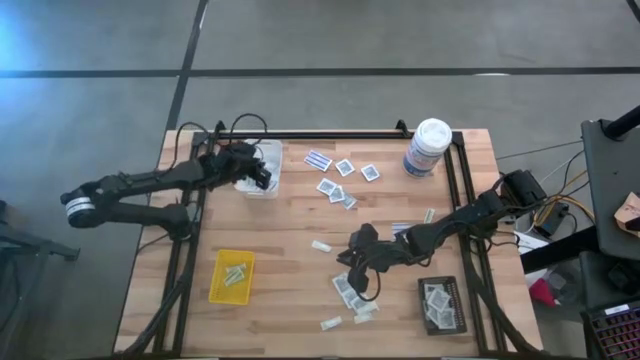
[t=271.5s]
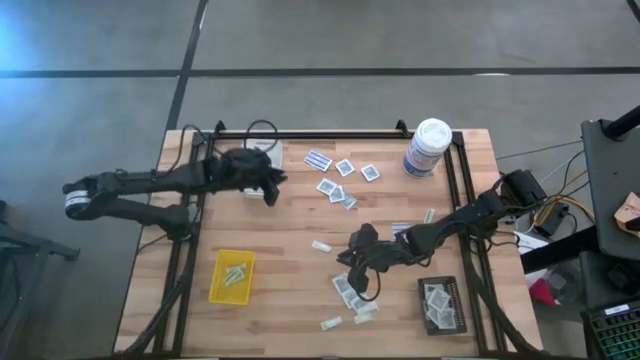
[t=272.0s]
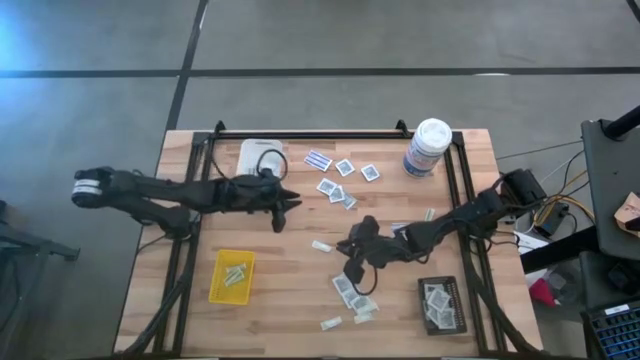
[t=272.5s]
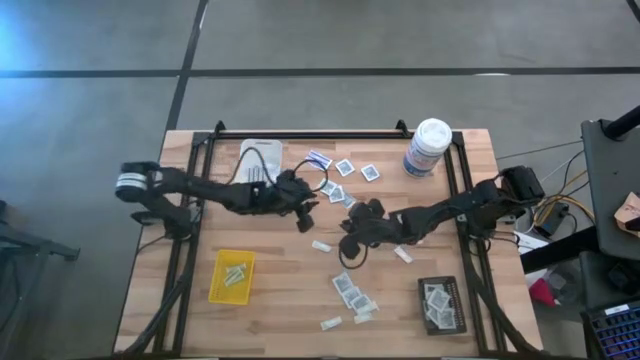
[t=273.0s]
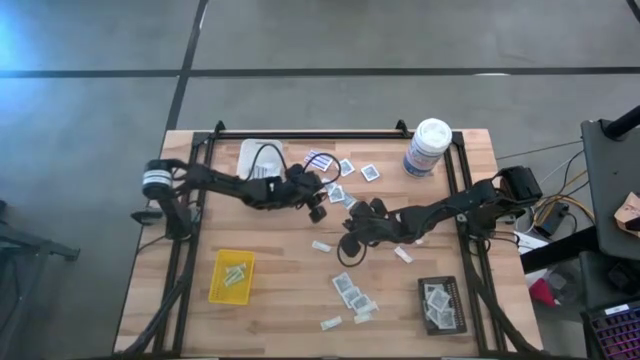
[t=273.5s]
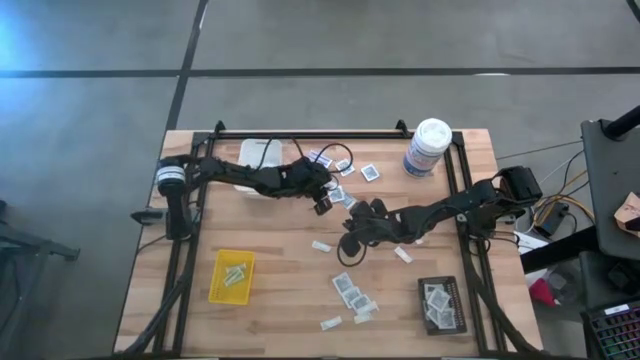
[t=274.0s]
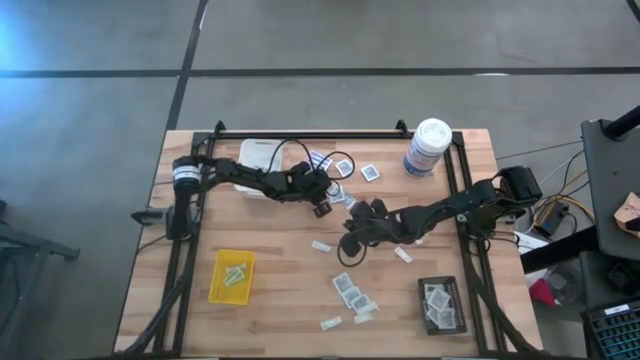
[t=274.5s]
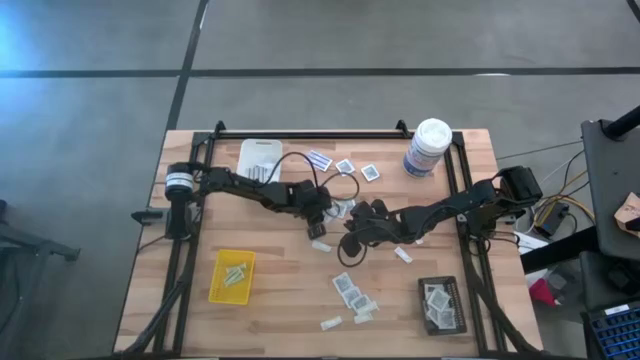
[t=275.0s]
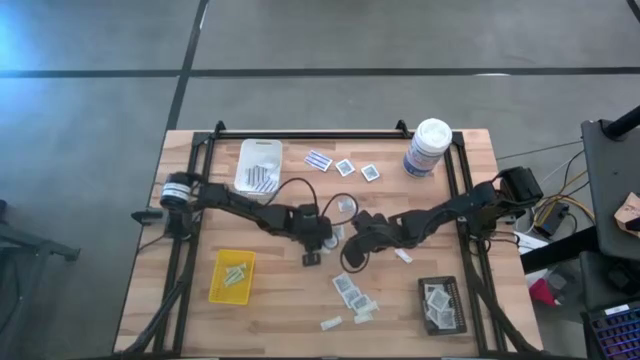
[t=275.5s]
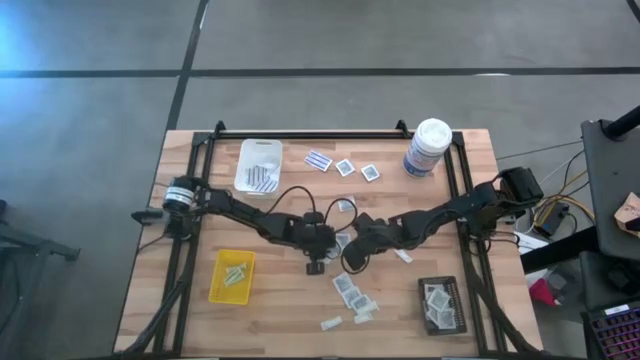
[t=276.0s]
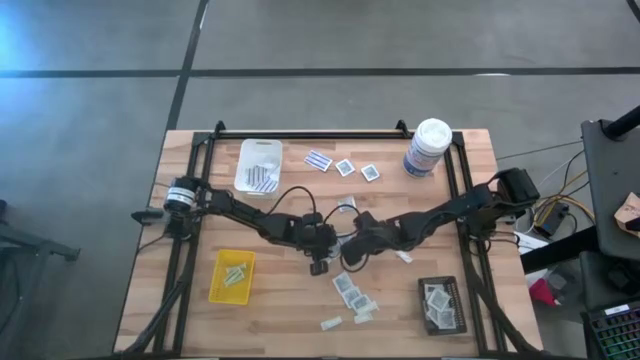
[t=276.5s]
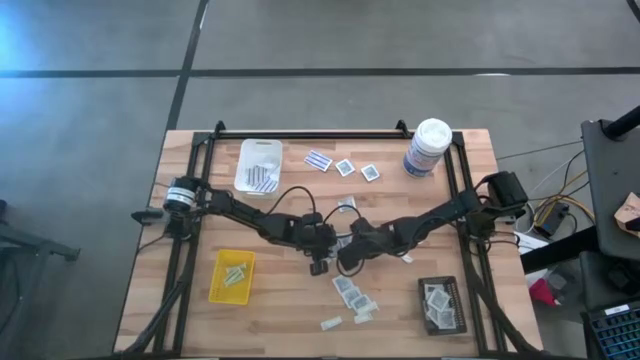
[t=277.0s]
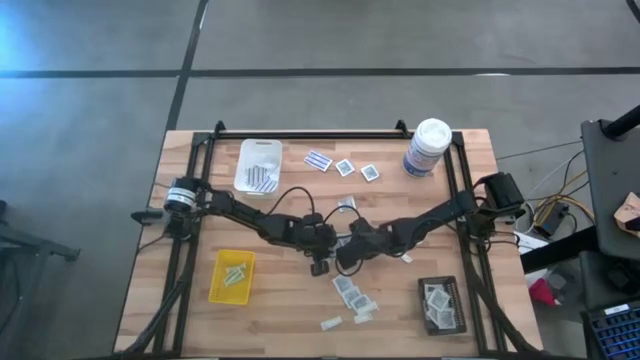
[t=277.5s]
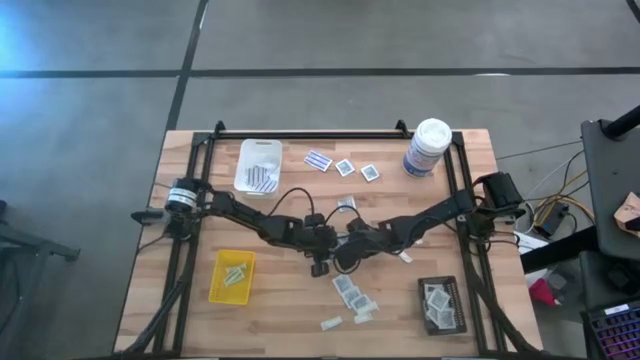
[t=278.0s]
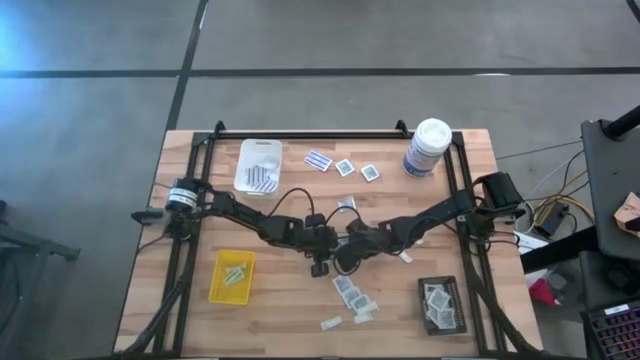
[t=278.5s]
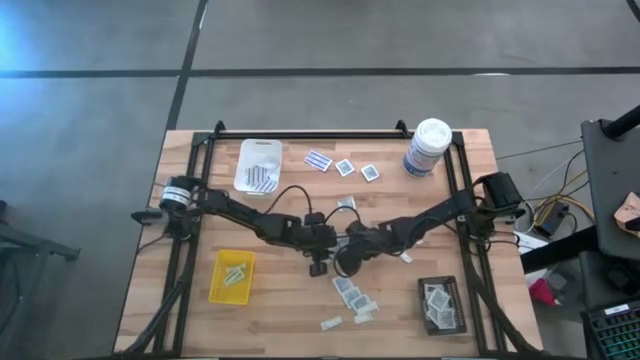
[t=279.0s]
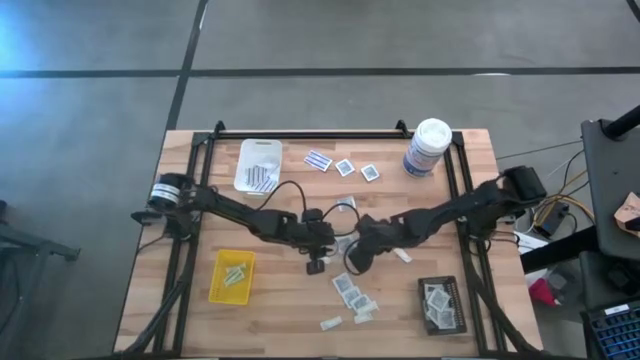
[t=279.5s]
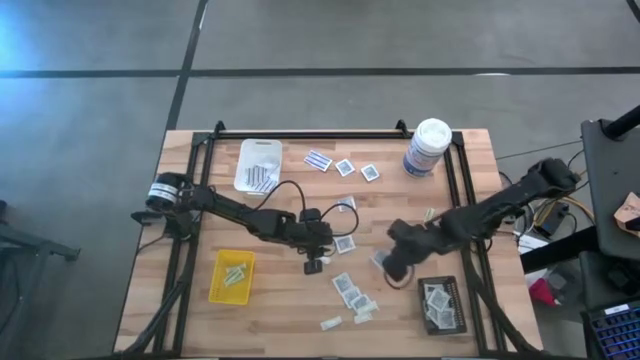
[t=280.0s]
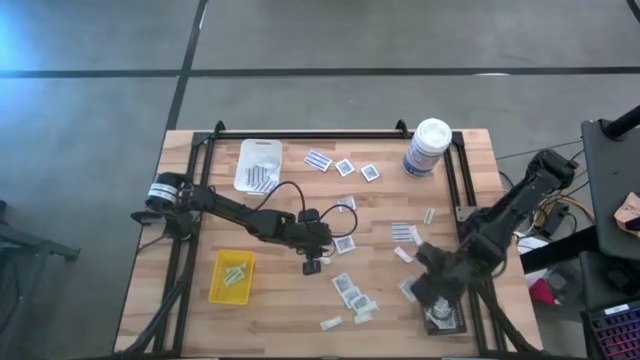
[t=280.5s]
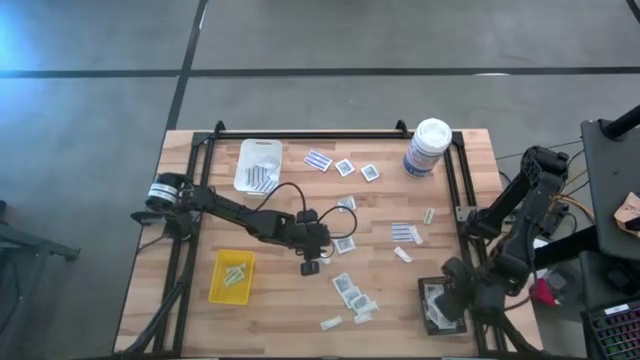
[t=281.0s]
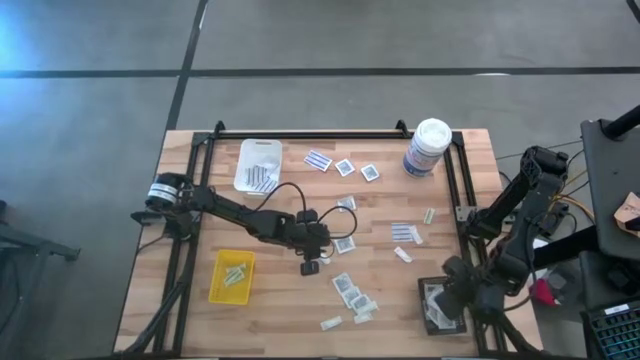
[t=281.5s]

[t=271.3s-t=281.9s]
Task: Pick & Place First Aid Supplies
Put the towelette pack into the black bin

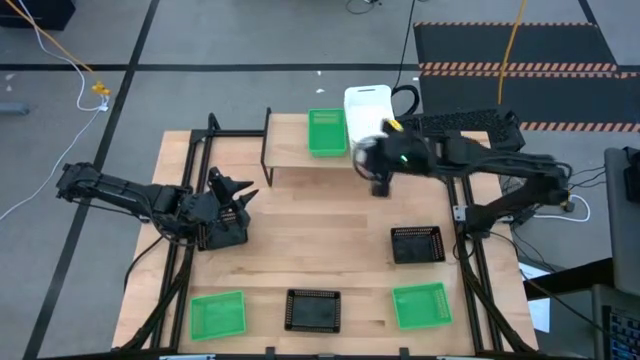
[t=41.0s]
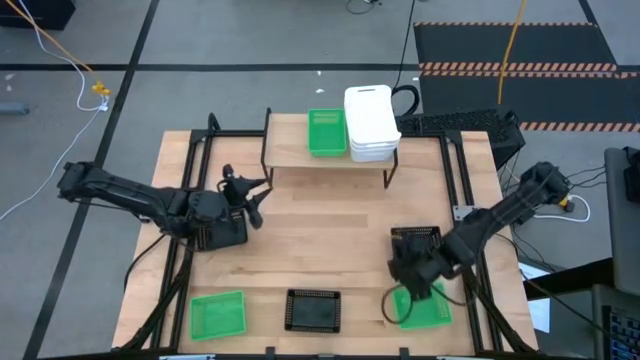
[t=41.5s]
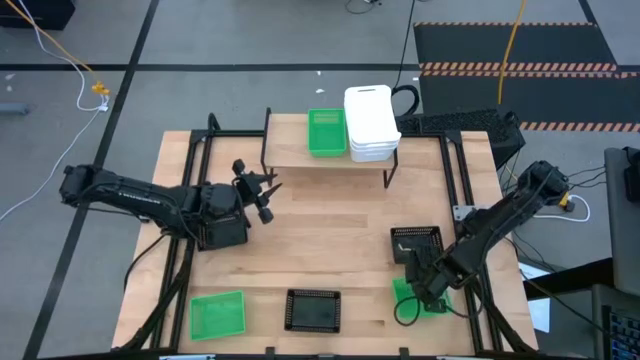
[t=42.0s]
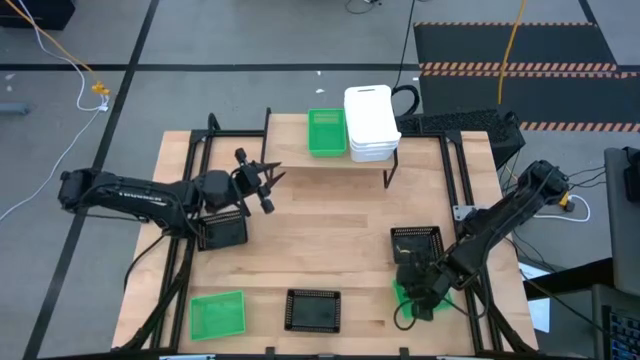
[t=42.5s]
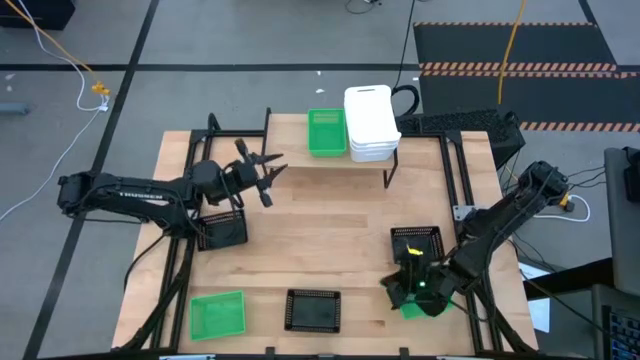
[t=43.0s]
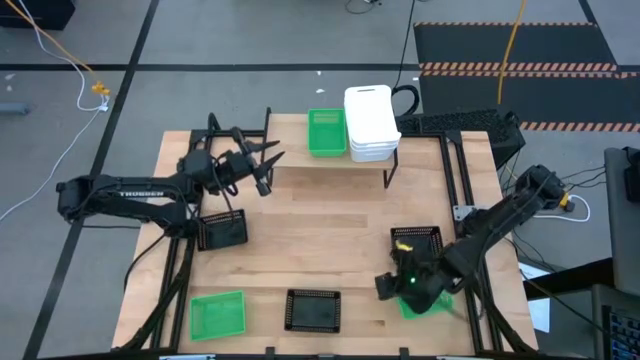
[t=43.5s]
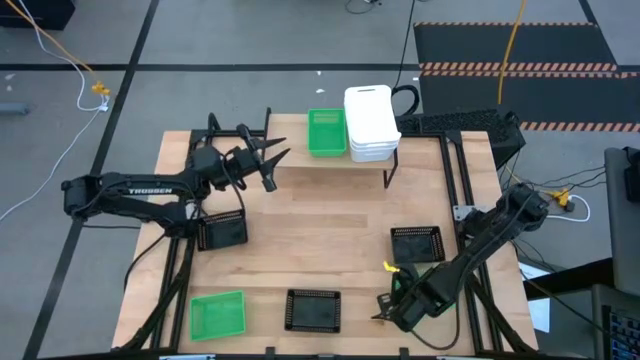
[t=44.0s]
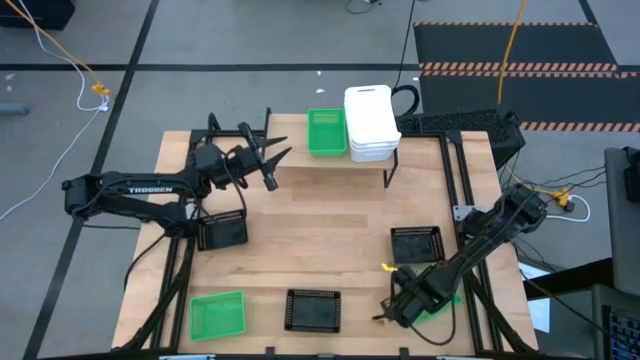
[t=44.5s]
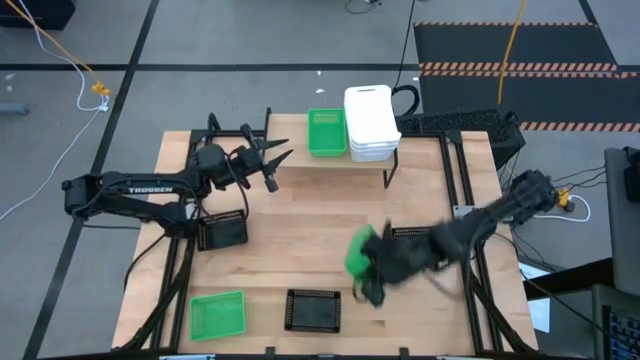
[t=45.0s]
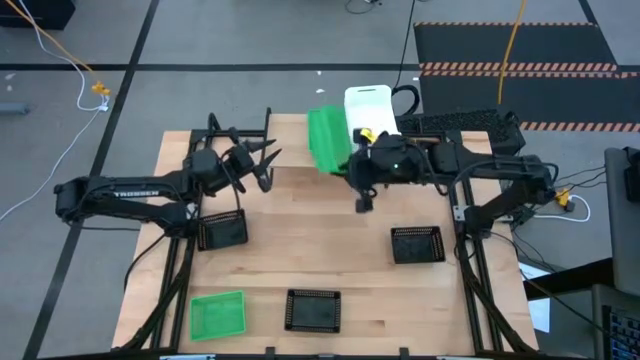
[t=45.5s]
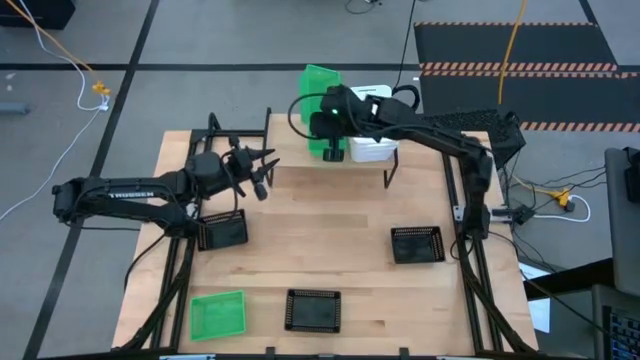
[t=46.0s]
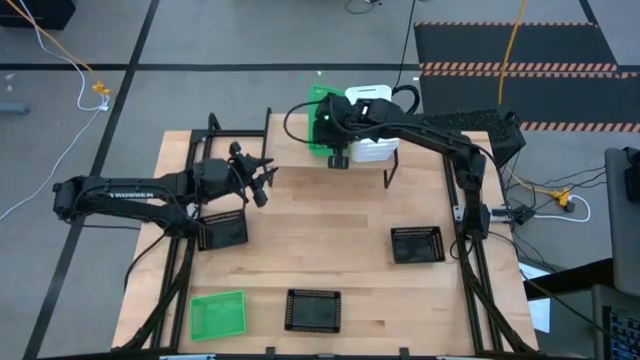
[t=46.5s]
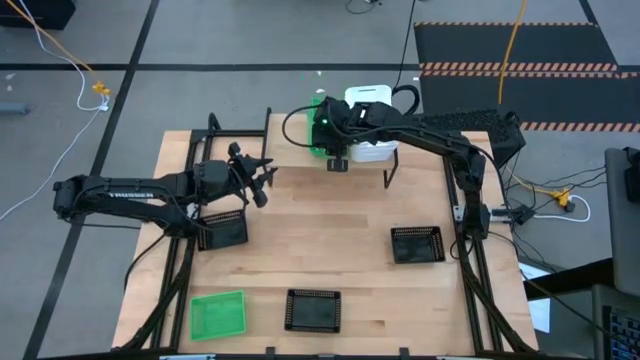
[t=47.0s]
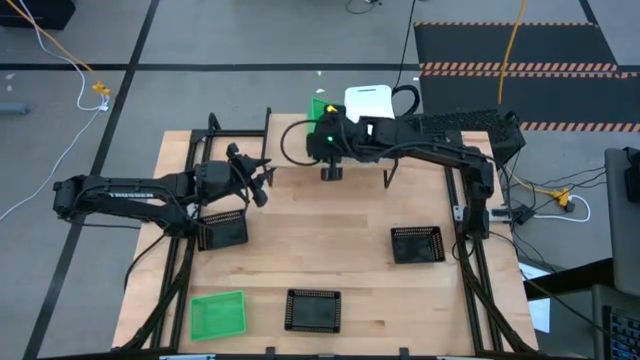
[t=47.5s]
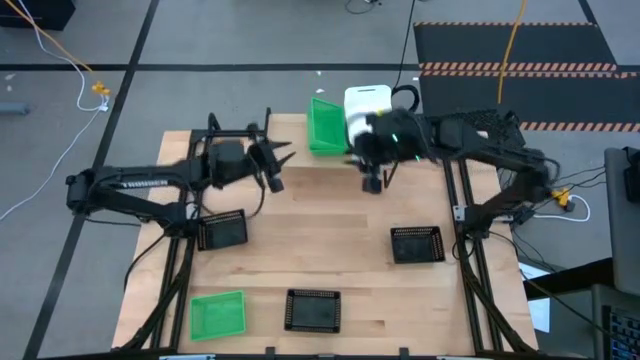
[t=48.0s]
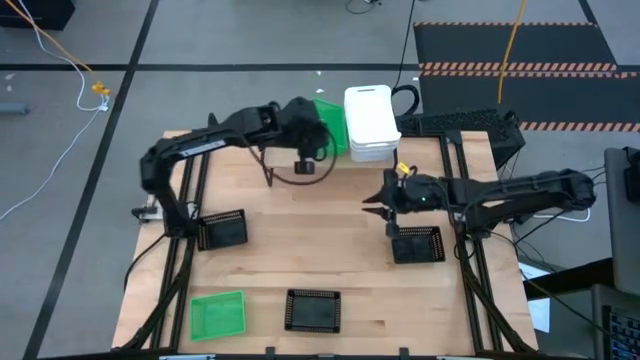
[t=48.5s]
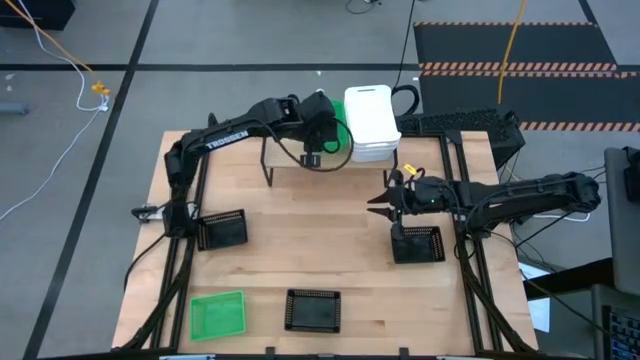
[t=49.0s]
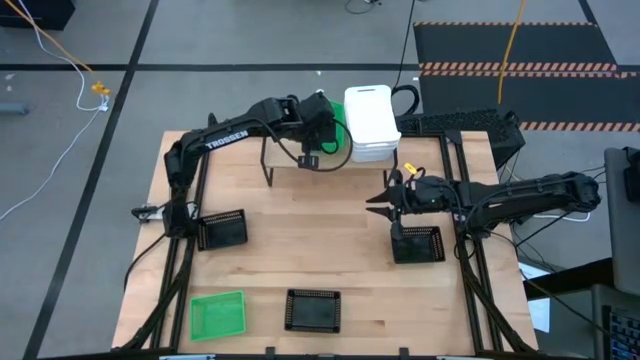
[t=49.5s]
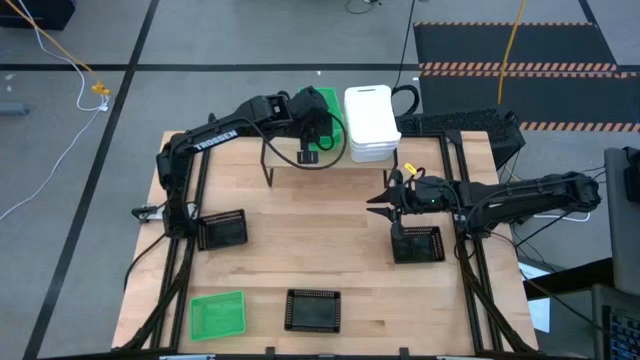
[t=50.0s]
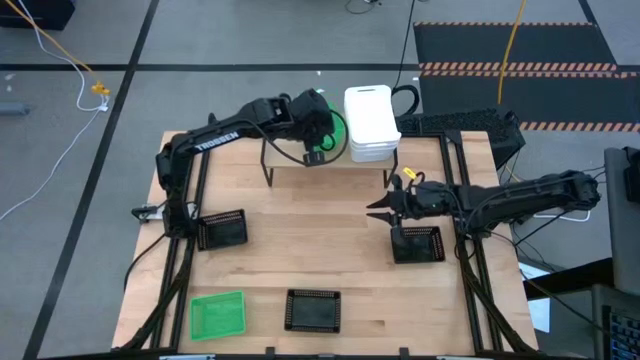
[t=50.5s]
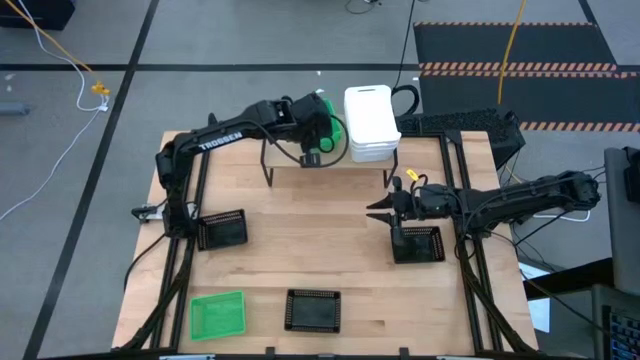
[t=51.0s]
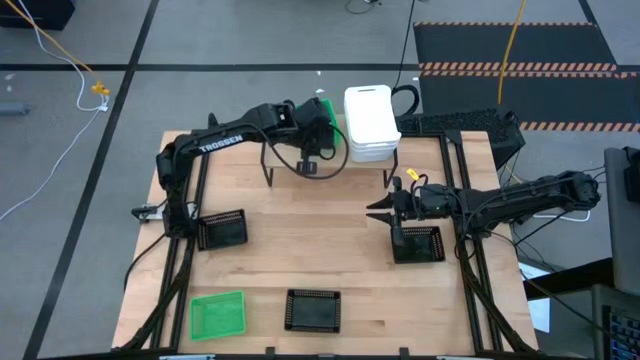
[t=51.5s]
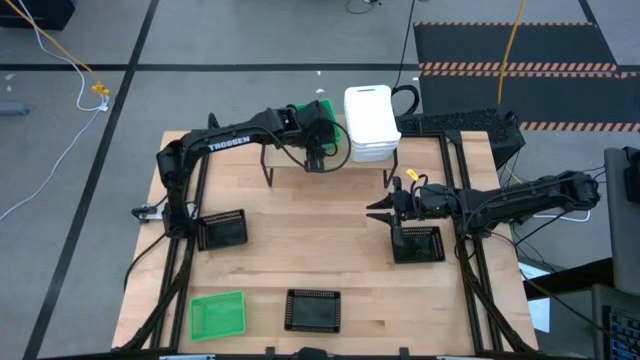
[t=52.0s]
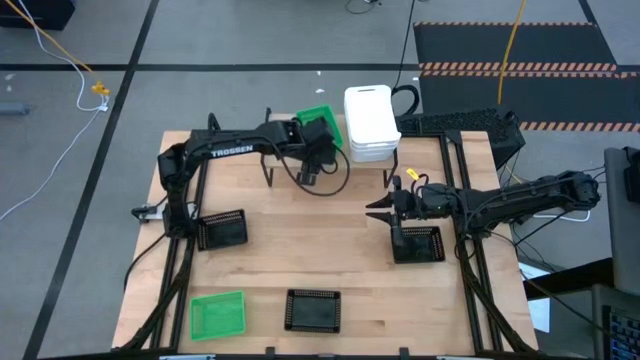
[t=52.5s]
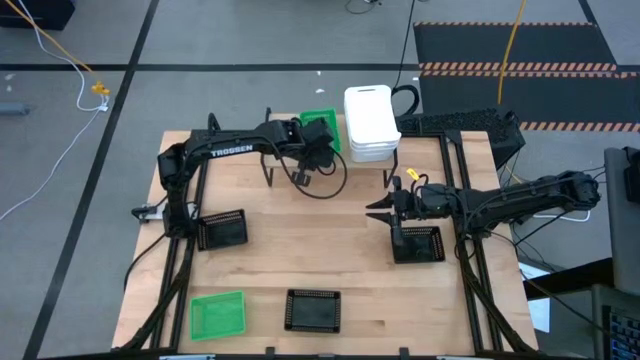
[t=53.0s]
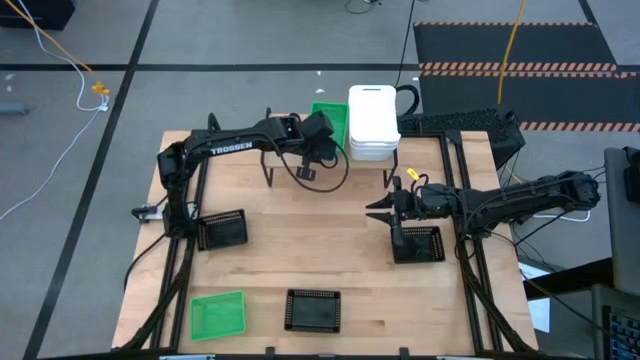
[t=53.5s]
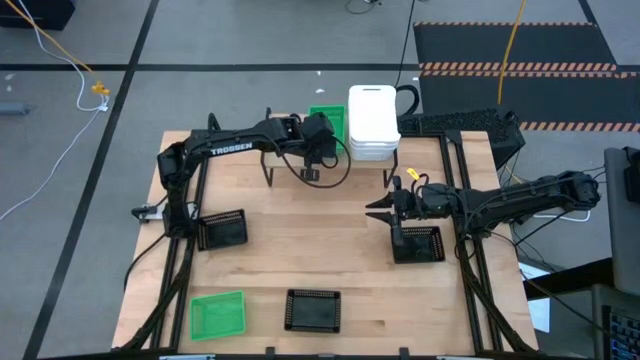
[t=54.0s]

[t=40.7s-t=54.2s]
Task: Stack baskets on shelf by color
Stack the right green bin on top of the other green bin on the shelf
